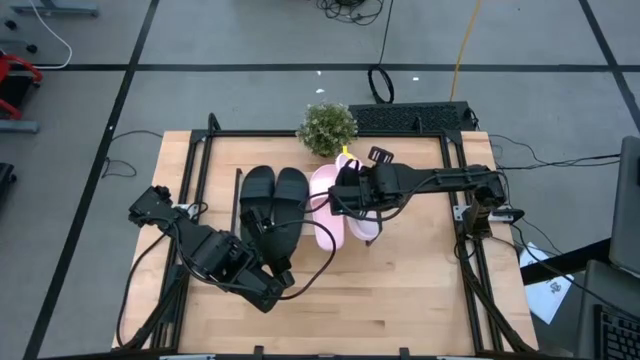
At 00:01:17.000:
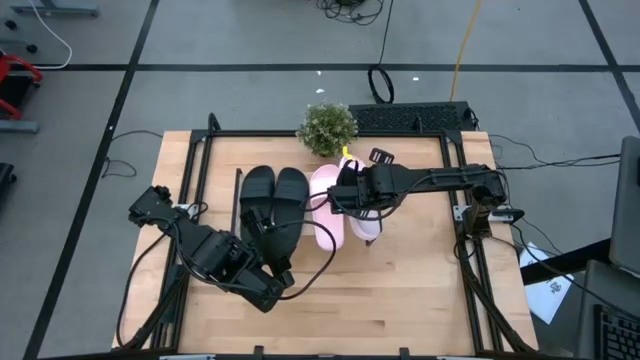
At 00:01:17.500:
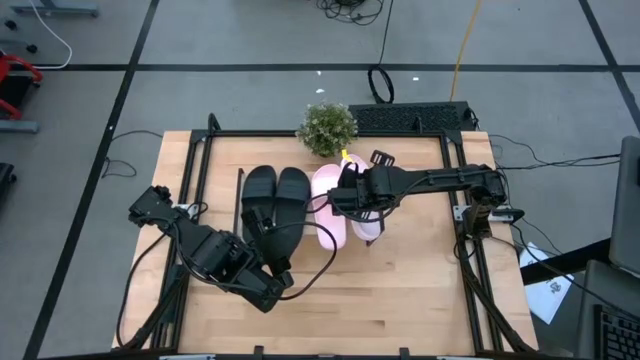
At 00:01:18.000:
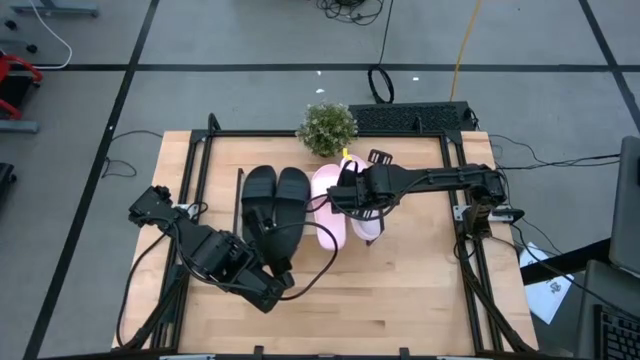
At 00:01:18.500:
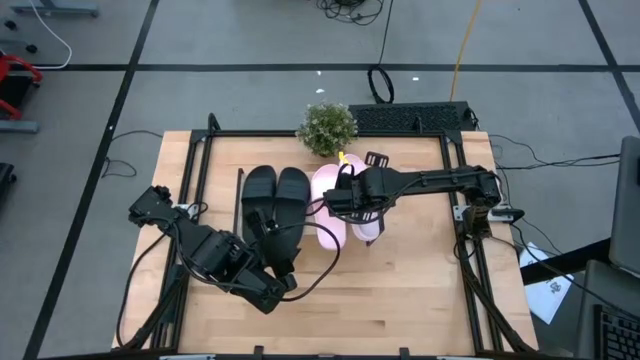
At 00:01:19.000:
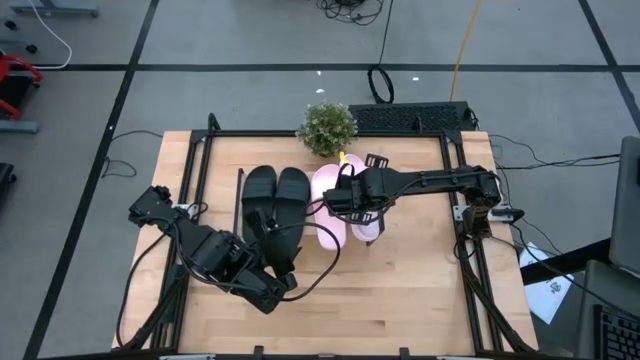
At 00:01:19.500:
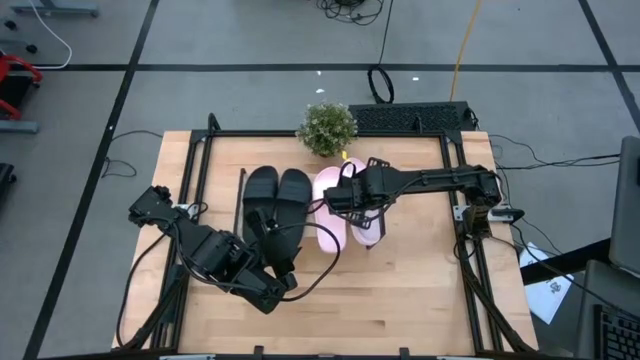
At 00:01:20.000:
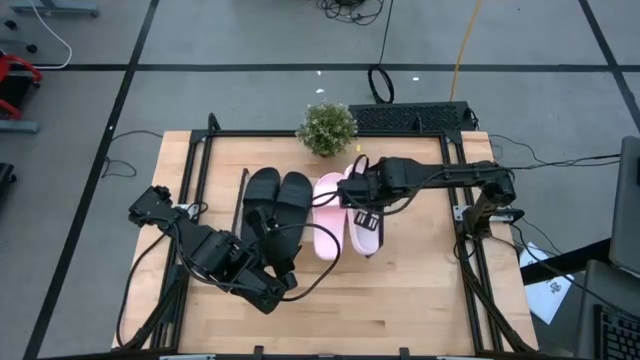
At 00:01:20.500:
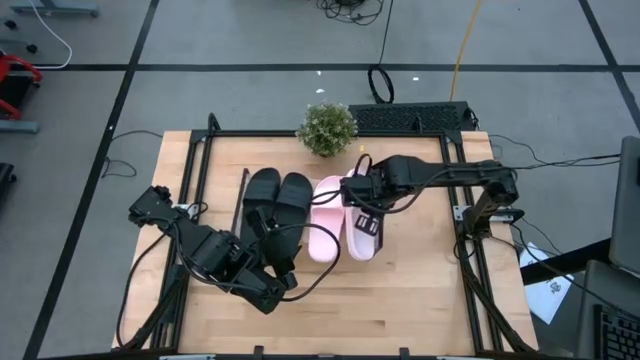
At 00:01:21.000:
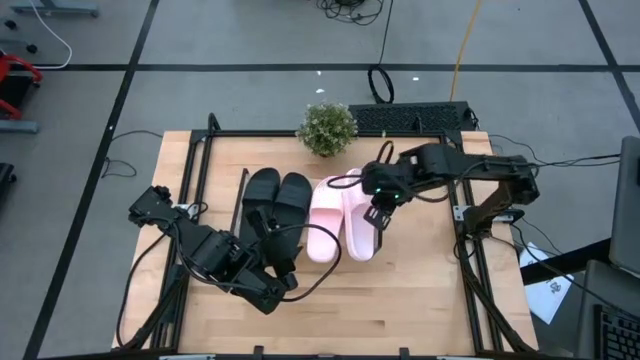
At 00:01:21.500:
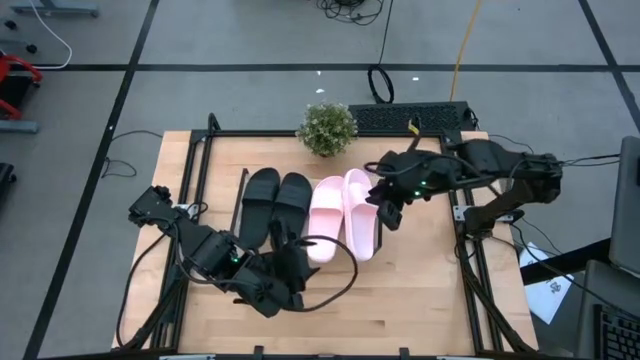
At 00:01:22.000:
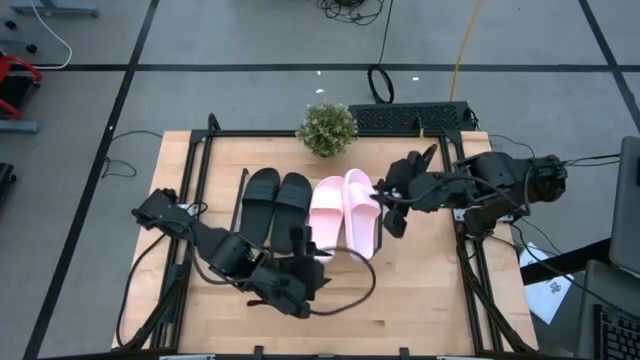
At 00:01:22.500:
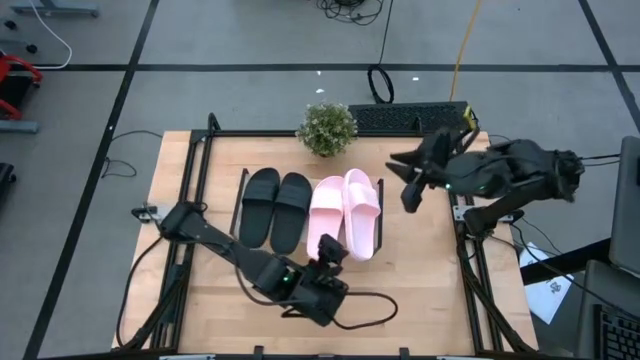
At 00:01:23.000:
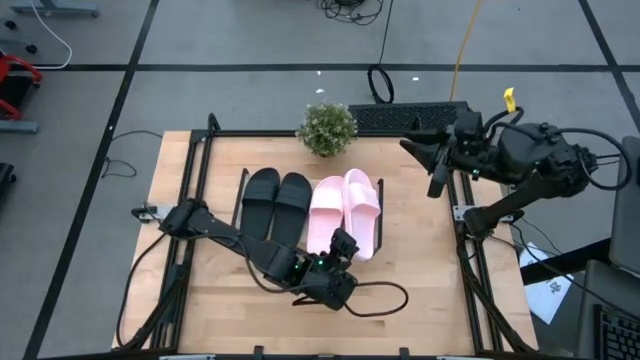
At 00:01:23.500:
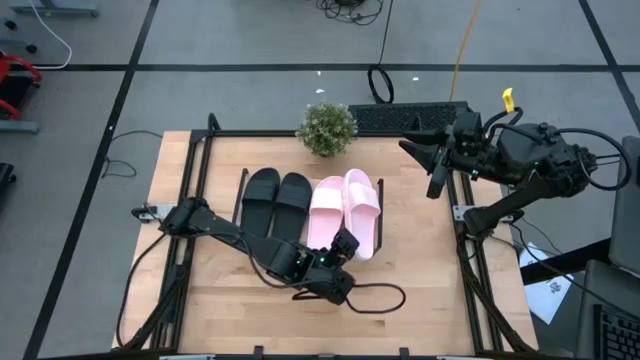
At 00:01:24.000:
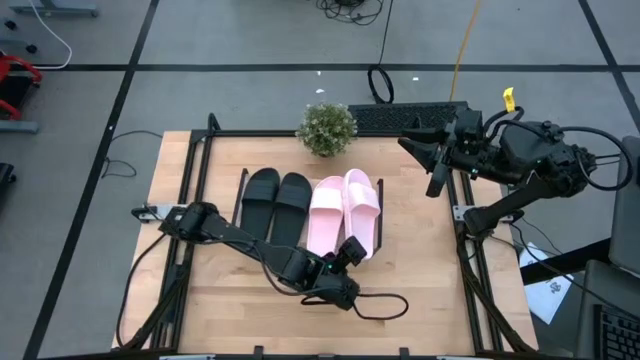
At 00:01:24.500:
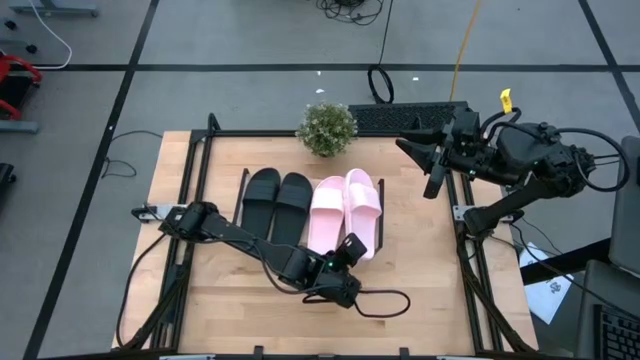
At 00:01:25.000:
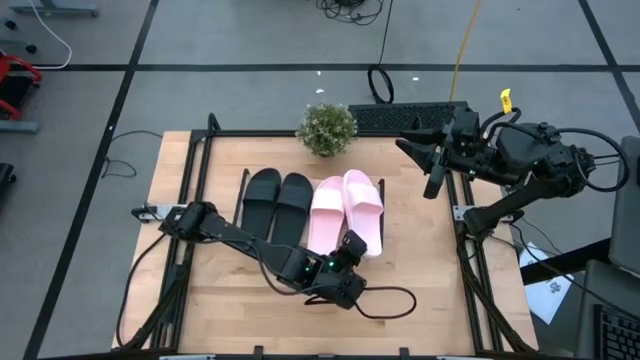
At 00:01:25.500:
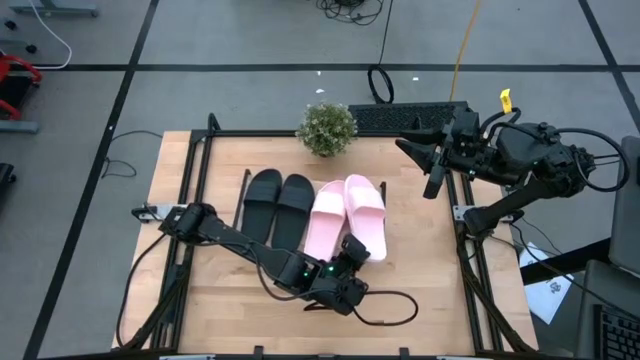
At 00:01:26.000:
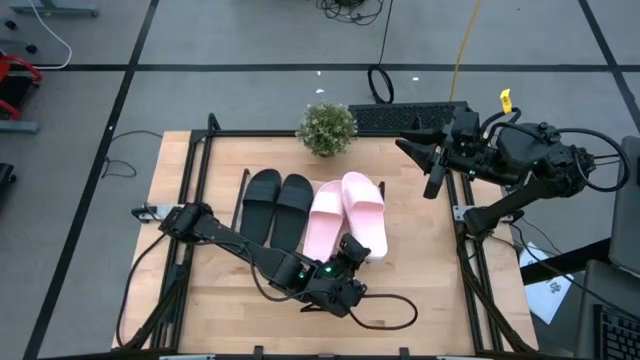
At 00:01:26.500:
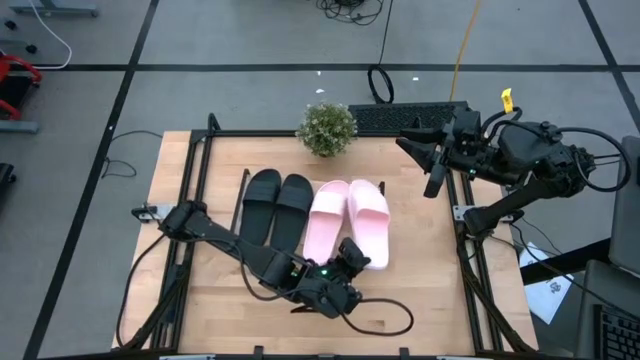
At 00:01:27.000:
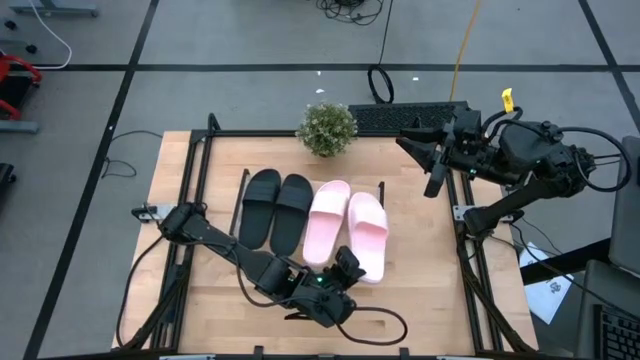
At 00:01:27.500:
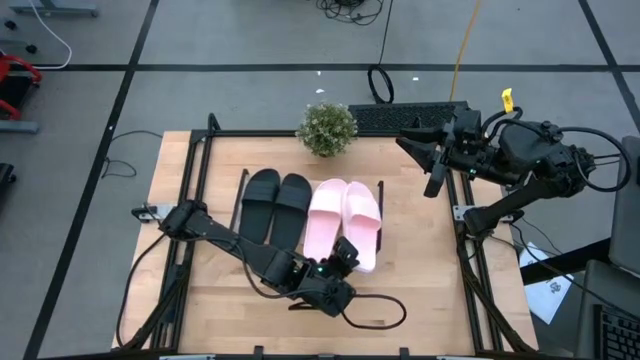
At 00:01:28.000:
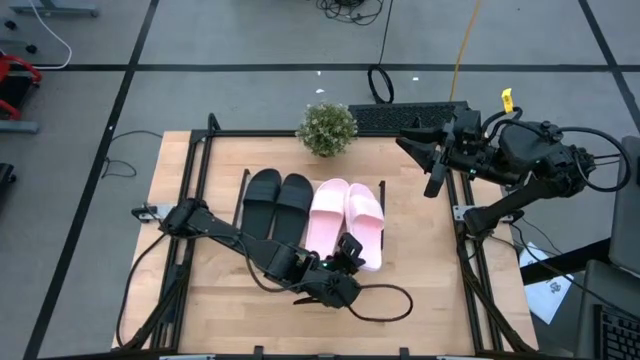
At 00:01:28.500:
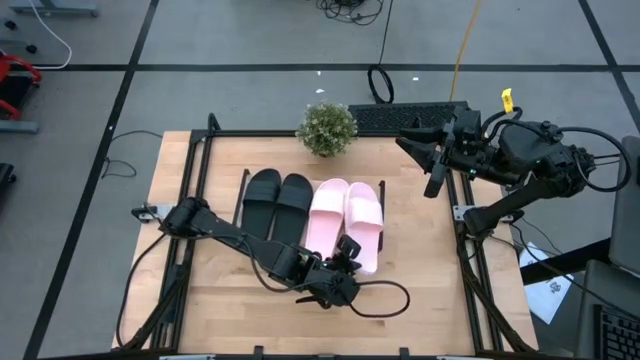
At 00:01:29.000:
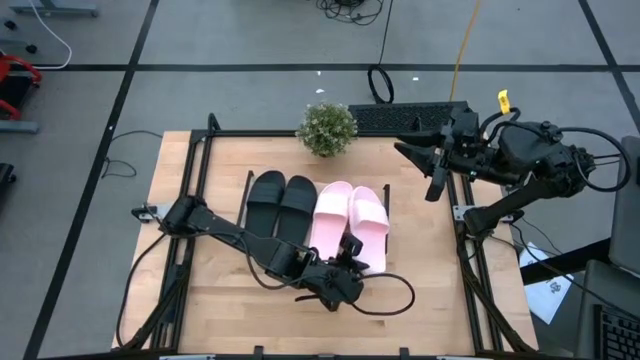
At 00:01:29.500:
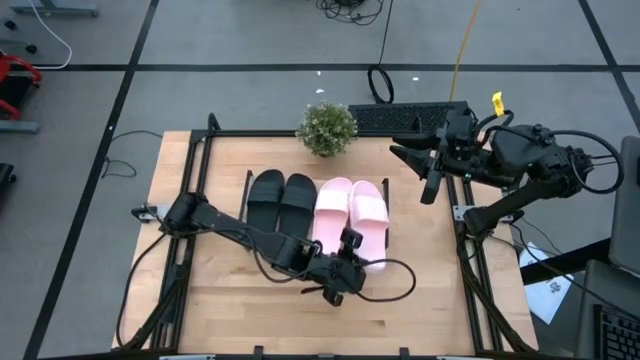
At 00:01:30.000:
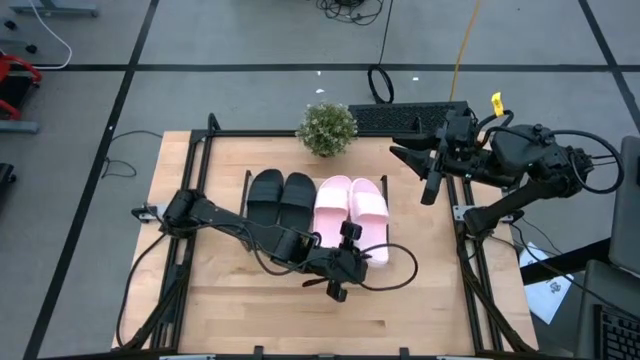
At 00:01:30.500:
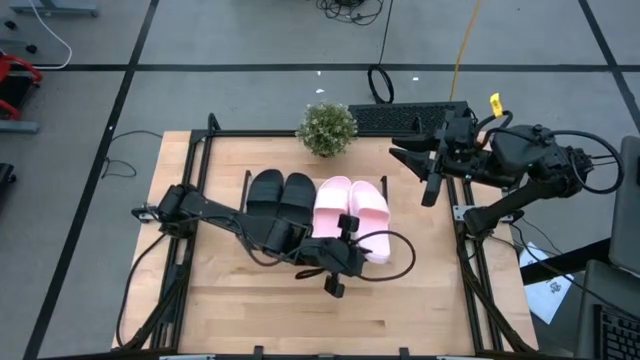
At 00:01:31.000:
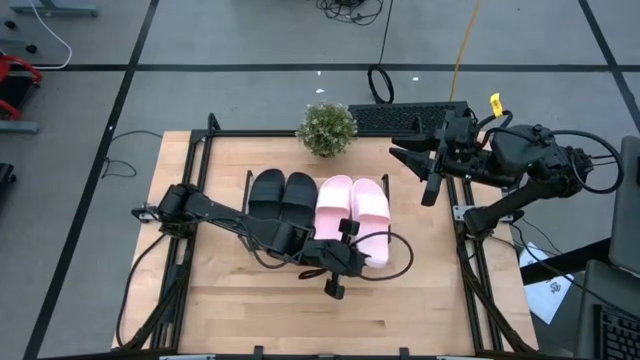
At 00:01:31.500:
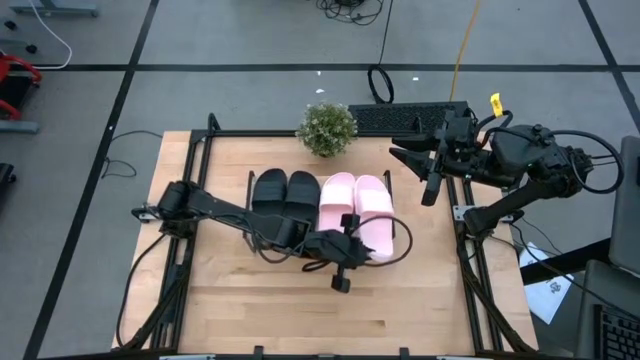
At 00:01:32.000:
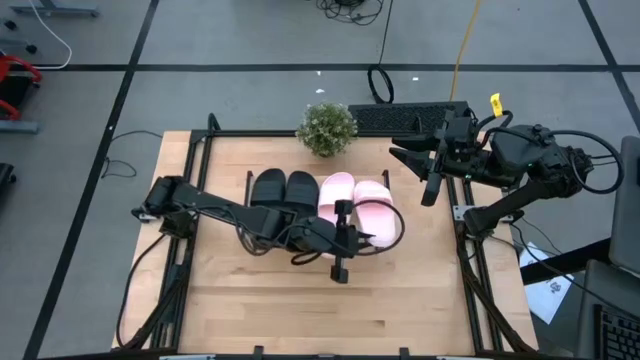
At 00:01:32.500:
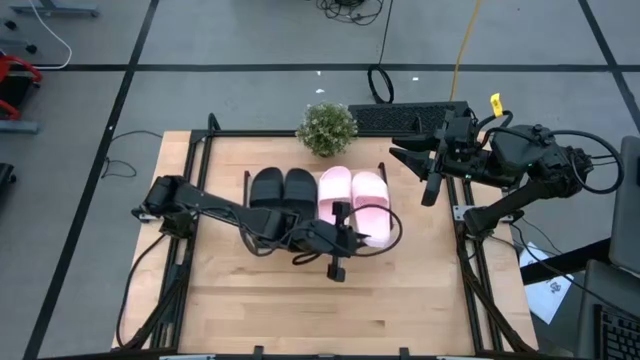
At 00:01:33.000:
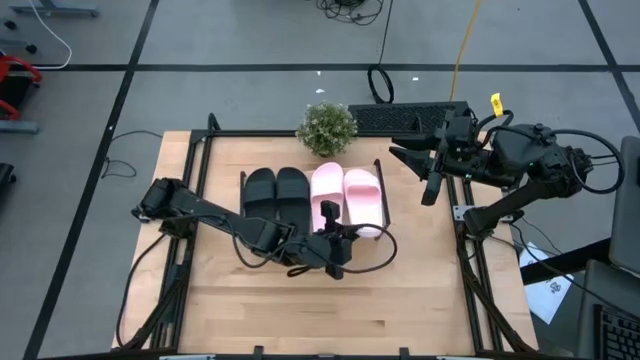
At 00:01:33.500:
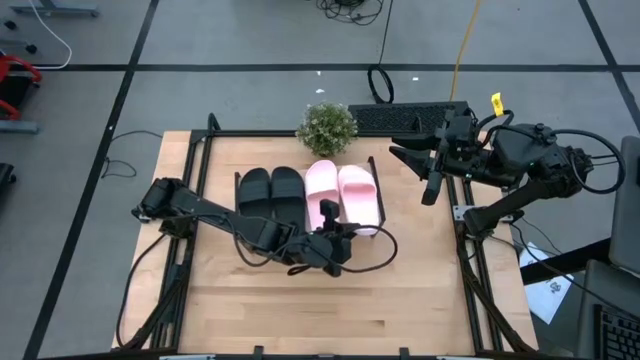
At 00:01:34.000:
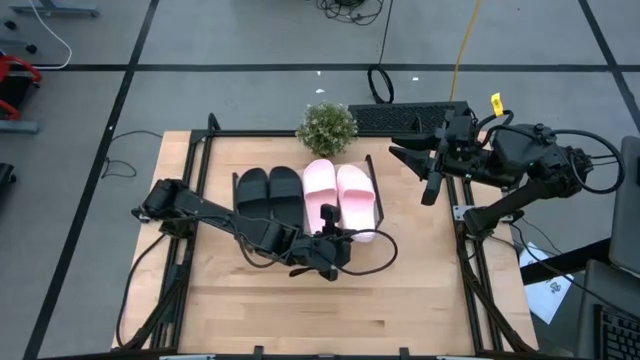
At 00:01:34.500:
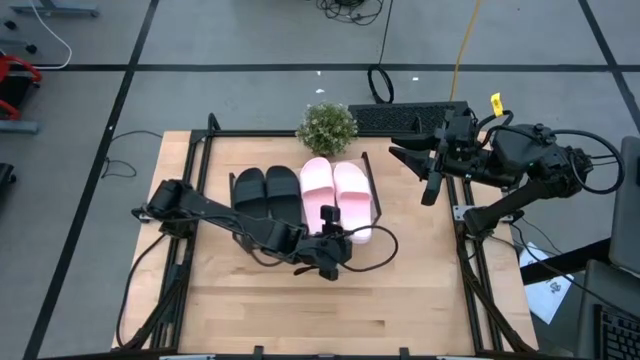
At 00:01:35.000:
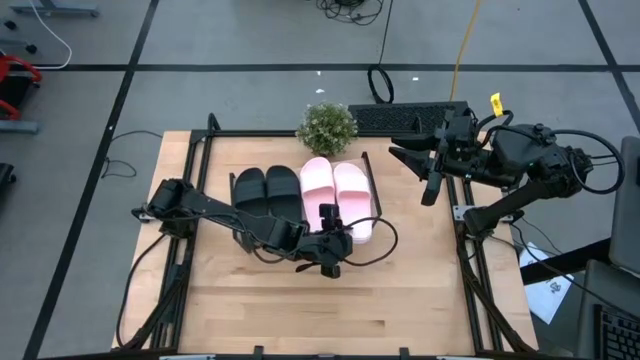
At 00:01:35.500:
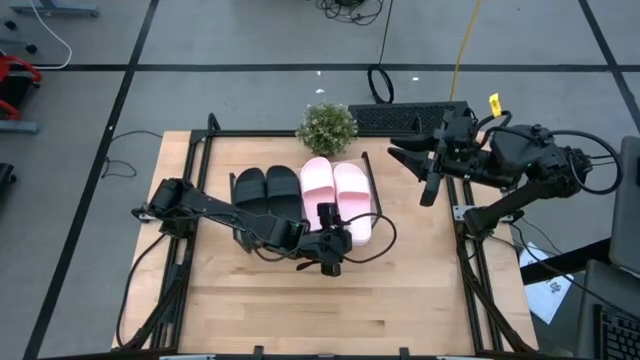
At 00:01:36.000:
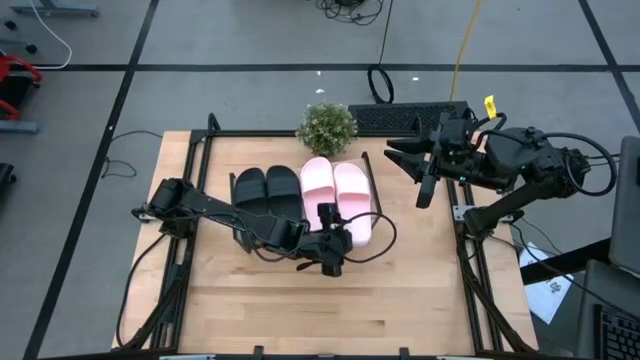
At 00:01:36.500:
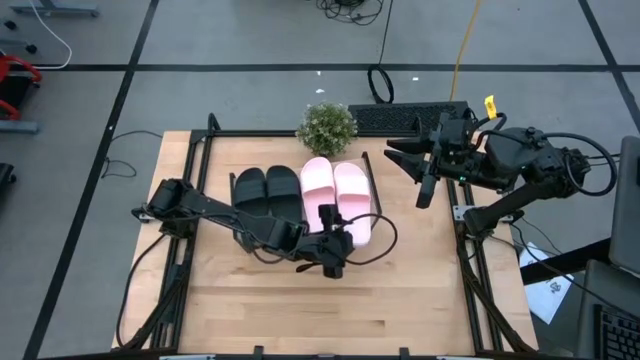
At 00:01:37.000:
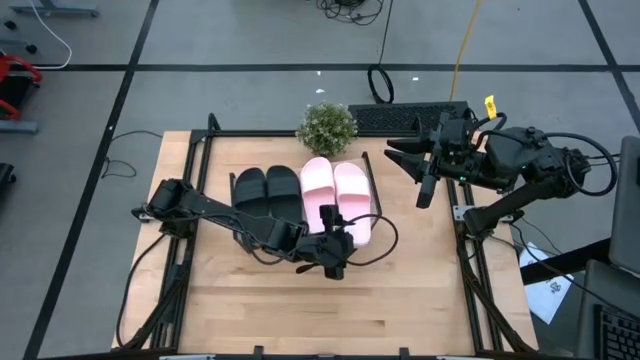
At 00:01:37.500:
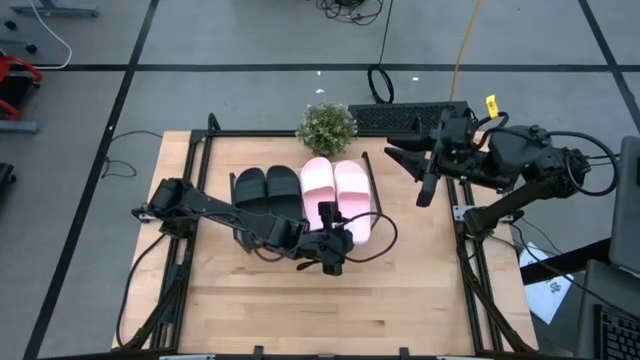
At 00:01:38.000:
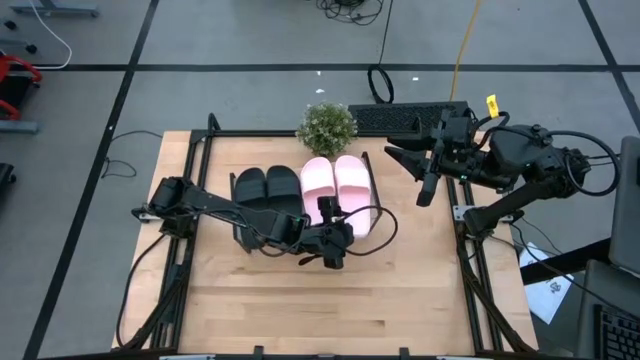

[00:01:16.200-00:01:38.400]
Task: Pick and place slides into the shelf
Put the pink slide on the shelf
